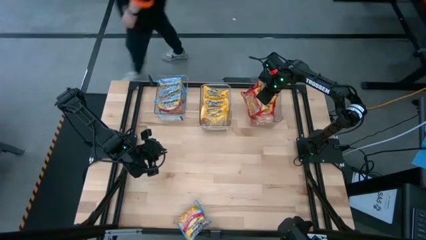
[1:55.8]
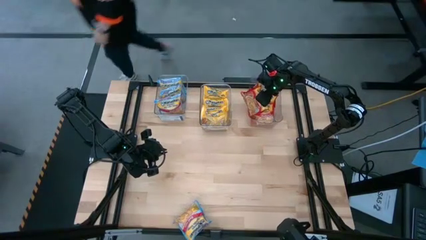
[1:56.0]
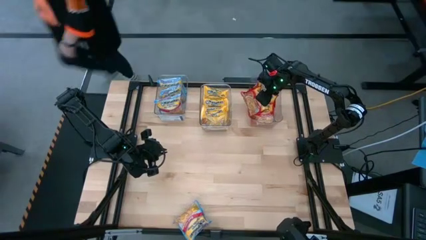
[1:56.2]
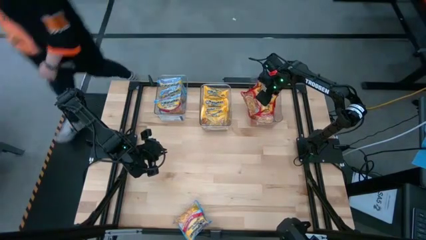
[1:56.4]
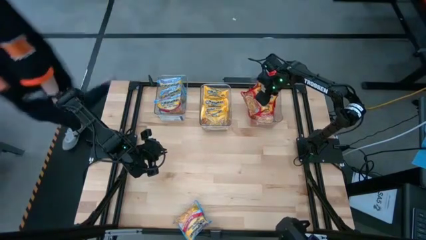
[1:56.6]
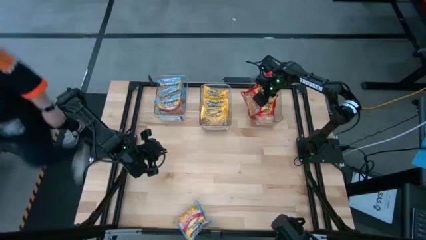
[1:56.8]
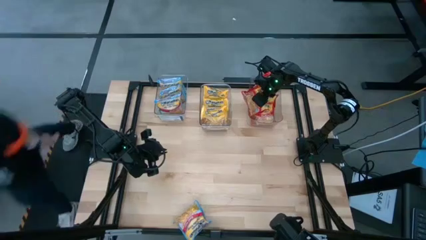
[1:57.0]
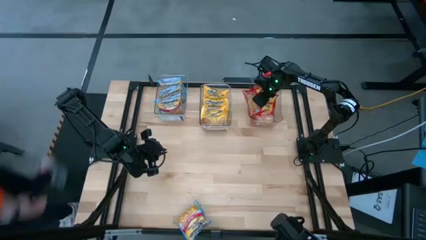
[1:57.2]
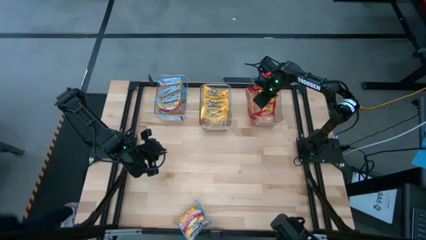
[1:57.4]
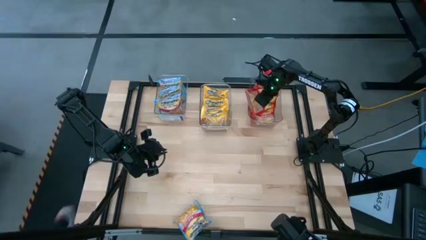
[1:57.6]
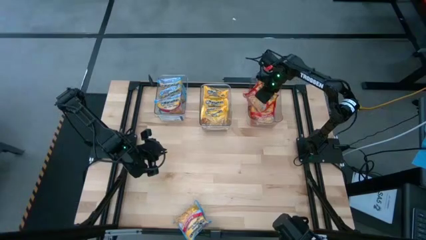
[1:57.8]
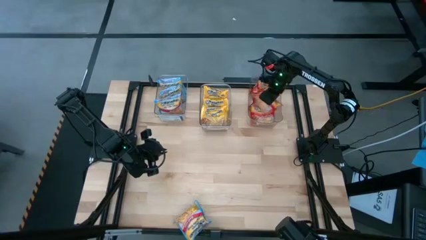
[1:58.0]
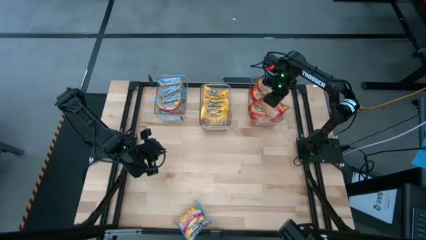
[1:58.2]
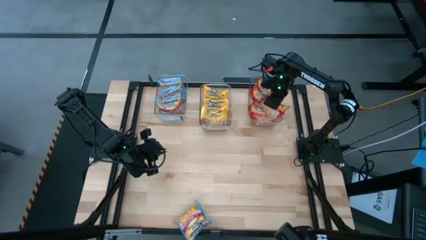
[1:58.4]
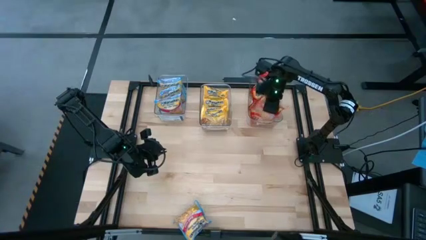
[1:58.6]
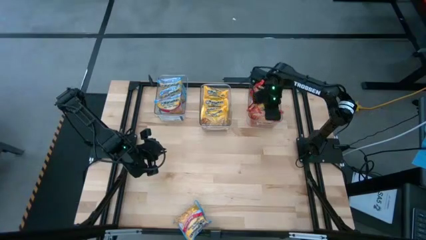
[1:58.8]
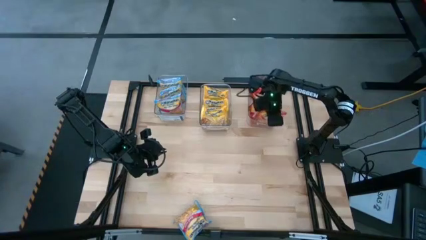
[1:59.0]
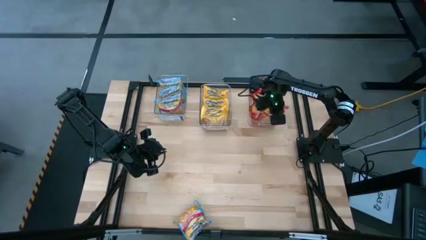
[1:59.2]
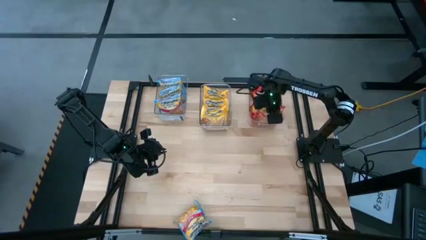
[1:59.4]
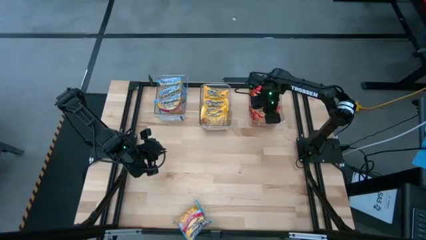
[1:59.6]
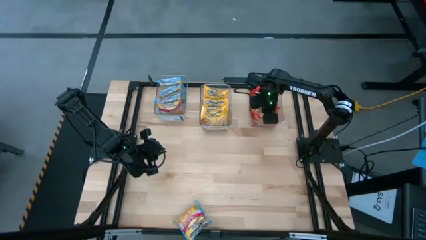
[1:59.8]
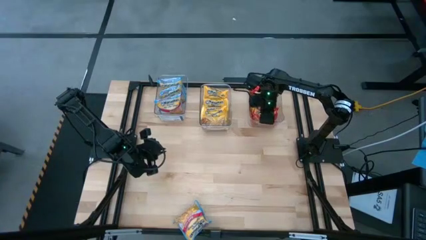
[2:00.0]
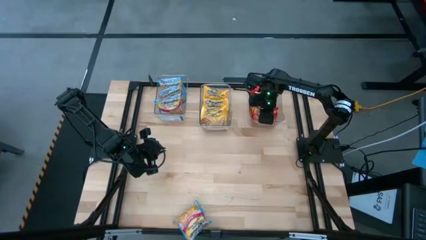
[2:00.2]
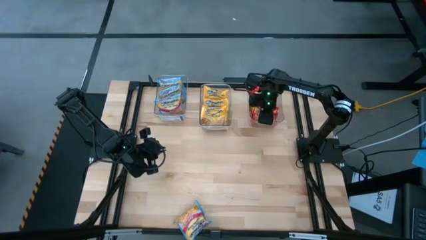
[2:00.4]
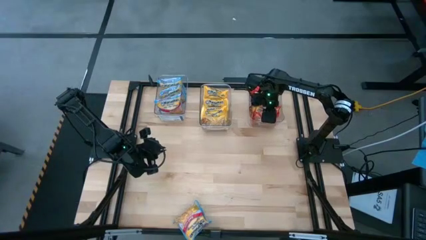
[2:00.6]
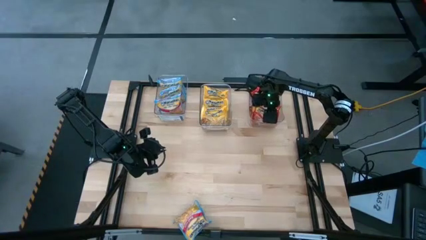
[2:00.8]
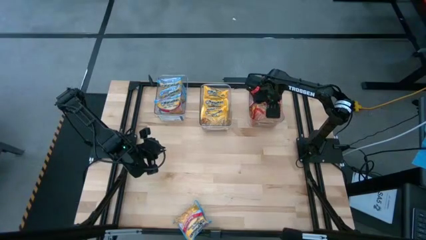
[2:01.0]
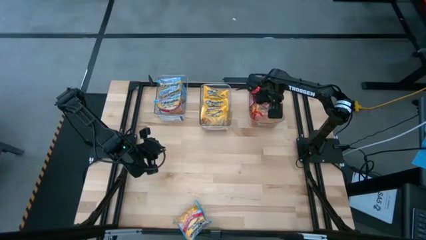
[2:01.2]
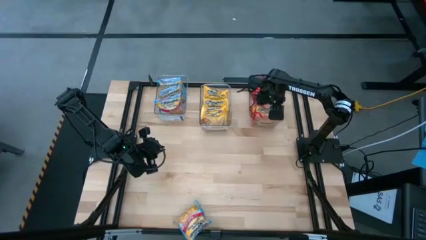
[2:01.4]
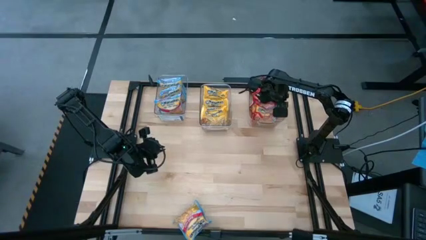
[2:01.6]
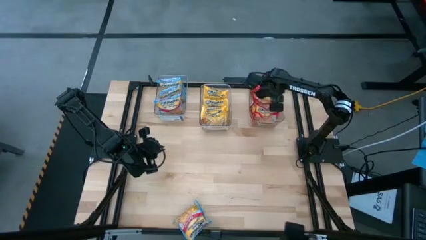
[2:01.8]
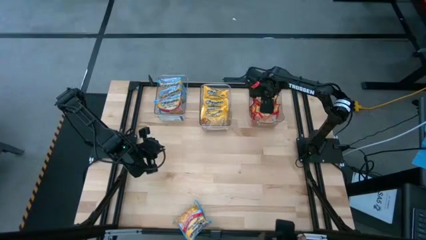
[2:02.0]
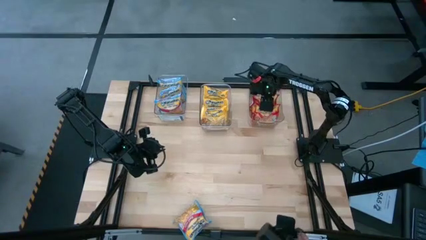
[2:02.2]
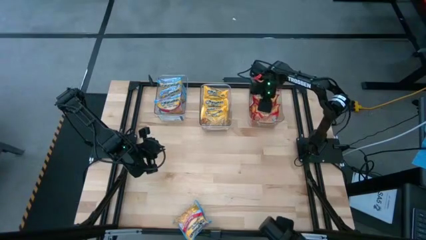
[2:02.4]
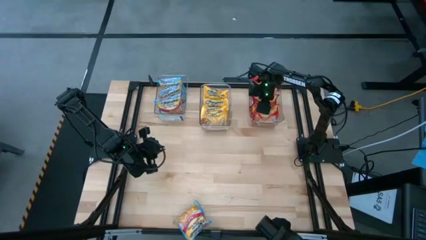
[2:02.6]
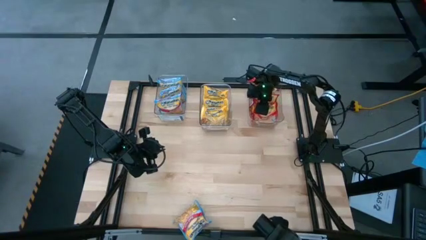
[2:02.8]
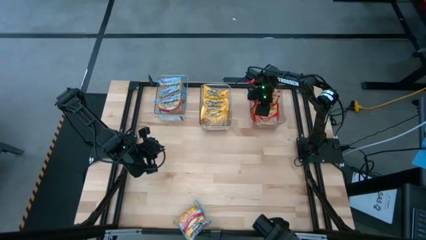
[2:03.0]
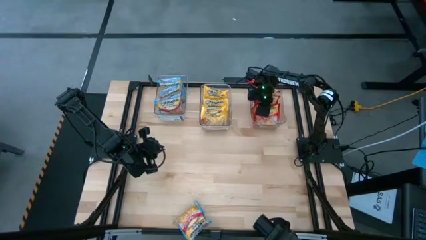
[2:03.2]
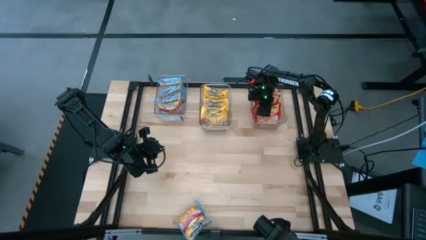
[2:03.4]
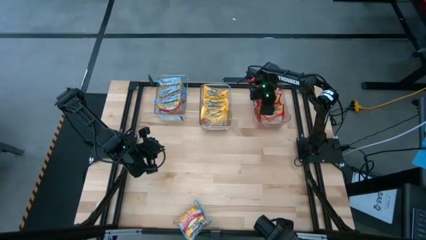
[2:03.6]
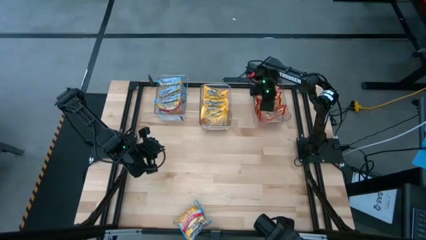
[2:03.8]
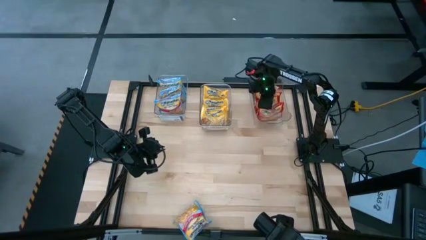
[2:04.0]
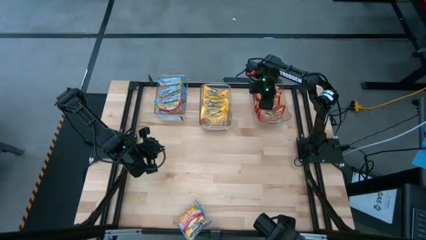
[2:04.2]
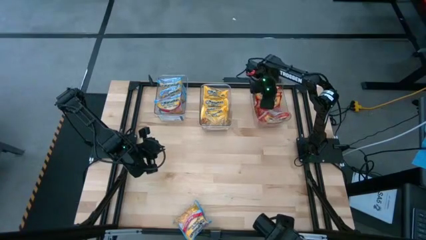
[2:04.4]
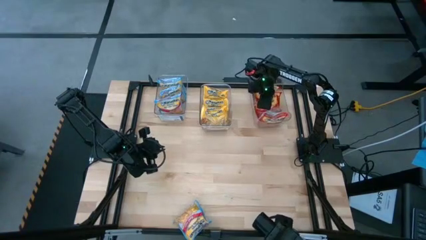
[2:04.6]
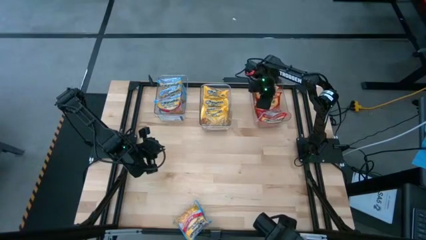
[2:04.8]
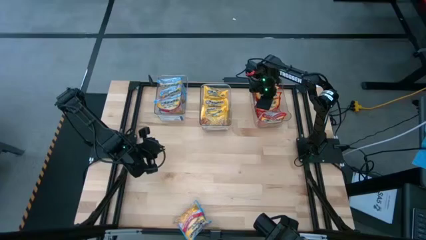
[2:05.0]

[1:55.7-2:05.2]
Task: Sort Maruchan noodles
Adjust the red noodle packs on the right transparent bin

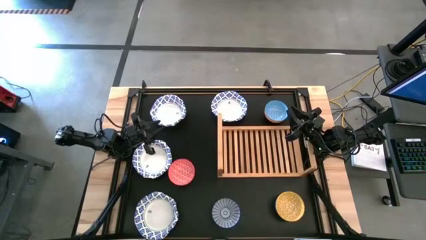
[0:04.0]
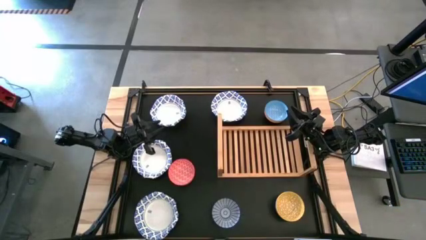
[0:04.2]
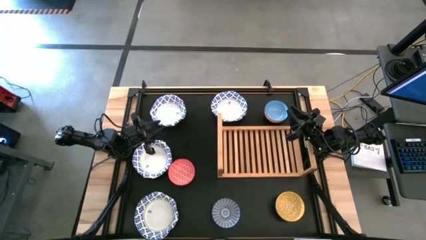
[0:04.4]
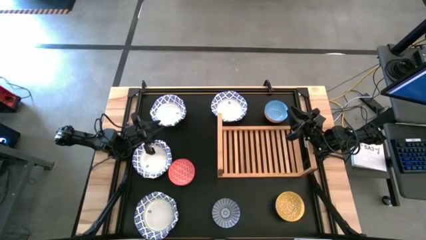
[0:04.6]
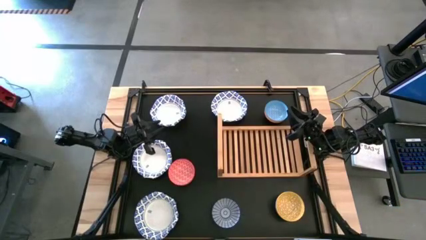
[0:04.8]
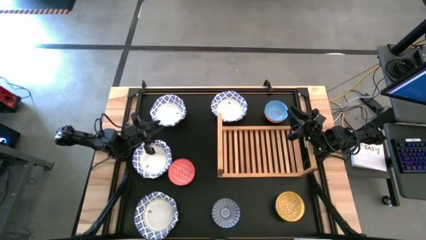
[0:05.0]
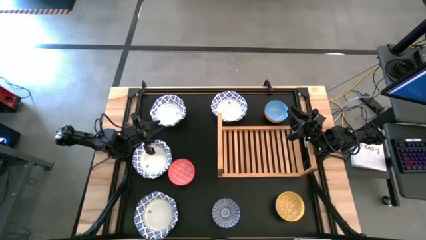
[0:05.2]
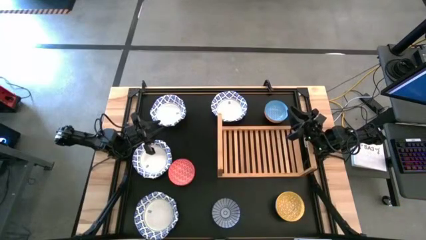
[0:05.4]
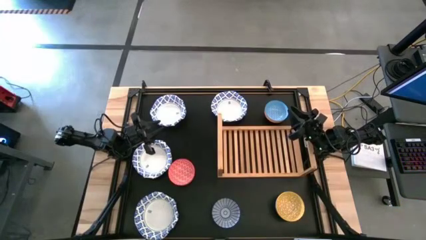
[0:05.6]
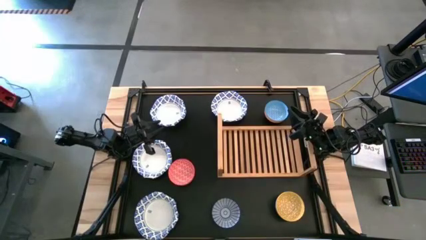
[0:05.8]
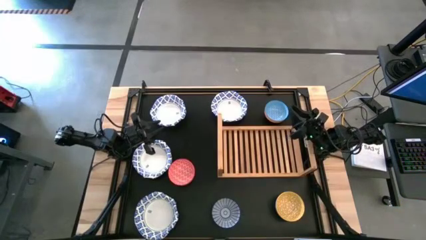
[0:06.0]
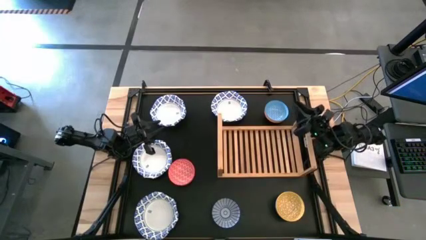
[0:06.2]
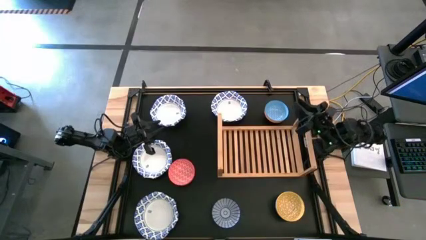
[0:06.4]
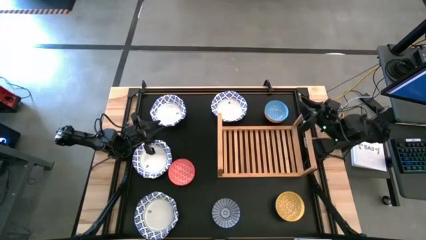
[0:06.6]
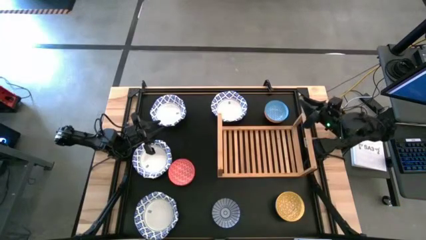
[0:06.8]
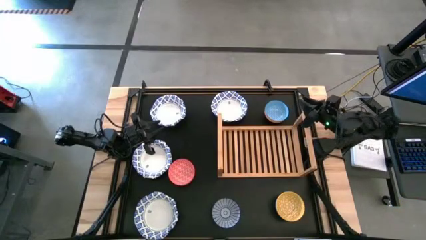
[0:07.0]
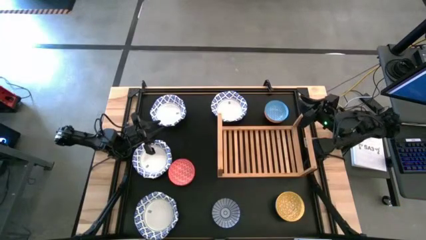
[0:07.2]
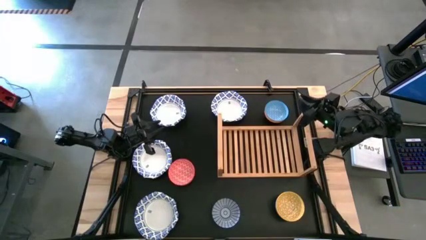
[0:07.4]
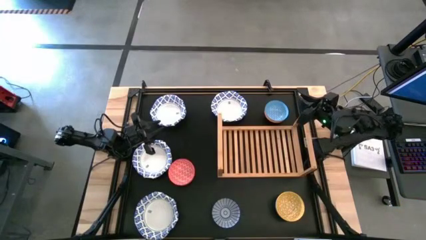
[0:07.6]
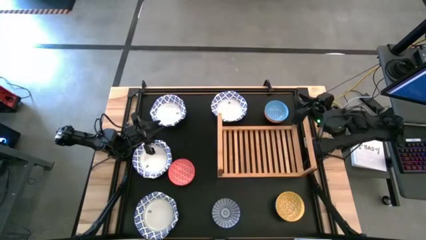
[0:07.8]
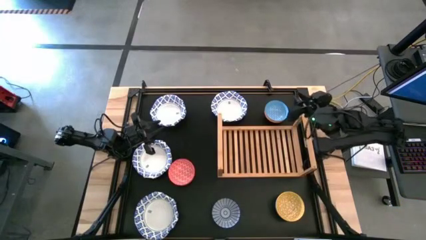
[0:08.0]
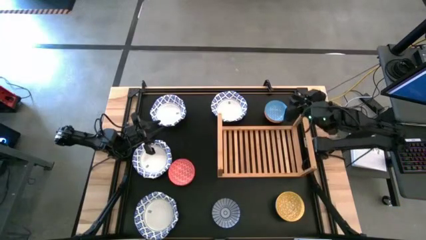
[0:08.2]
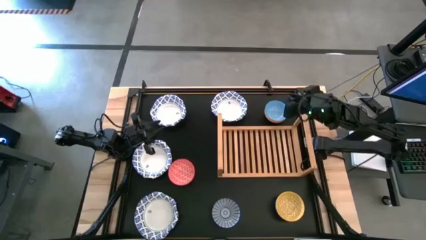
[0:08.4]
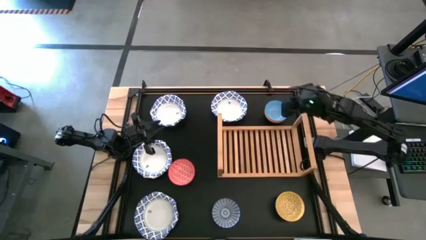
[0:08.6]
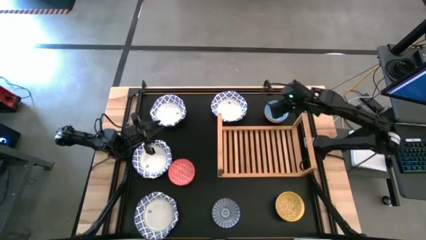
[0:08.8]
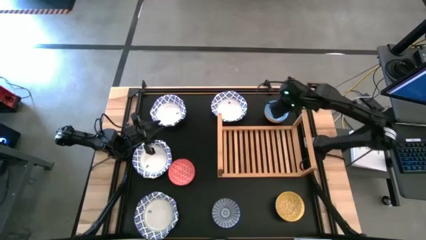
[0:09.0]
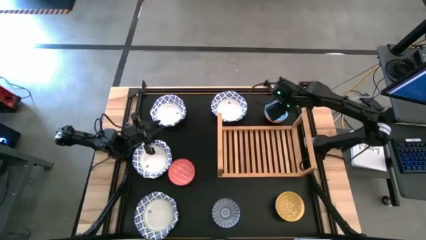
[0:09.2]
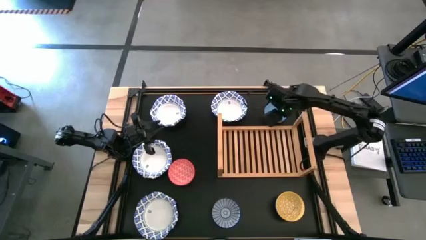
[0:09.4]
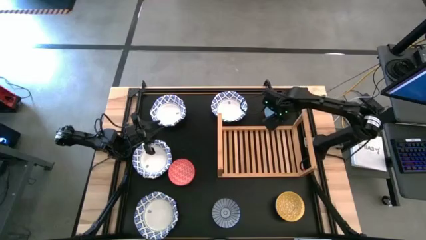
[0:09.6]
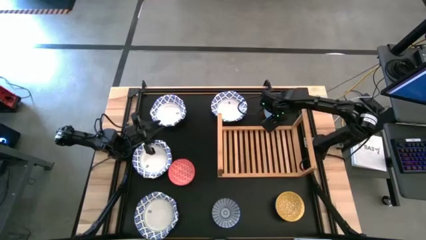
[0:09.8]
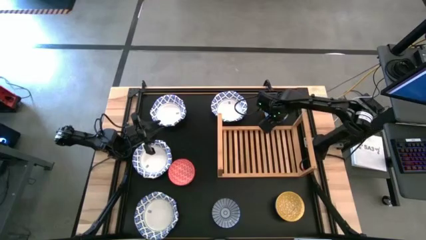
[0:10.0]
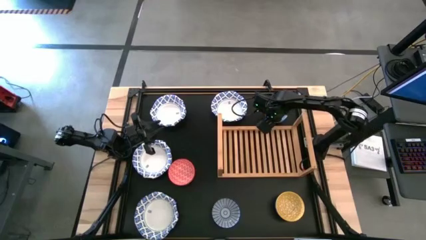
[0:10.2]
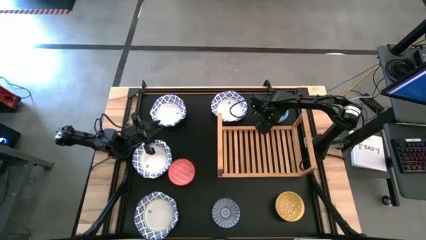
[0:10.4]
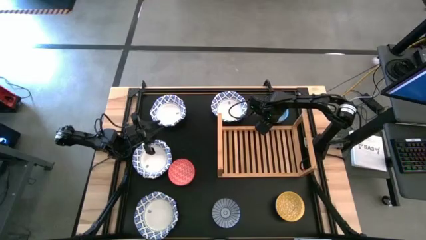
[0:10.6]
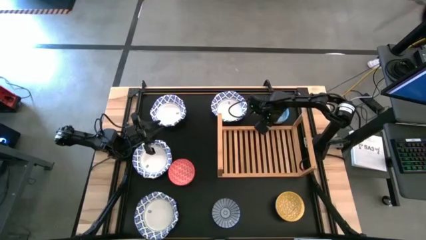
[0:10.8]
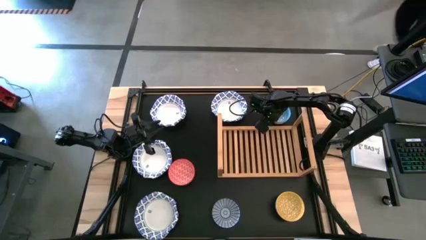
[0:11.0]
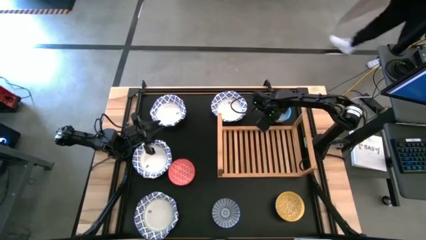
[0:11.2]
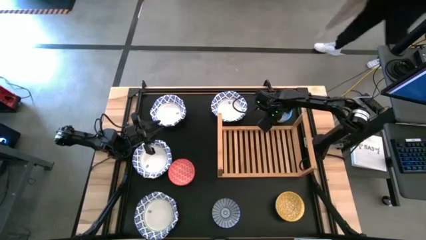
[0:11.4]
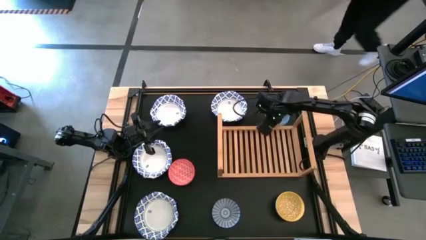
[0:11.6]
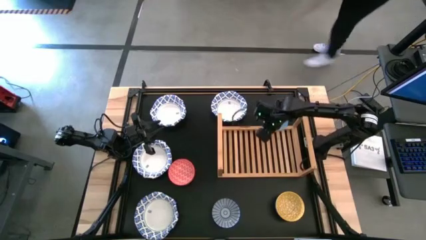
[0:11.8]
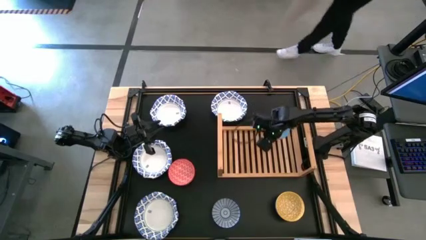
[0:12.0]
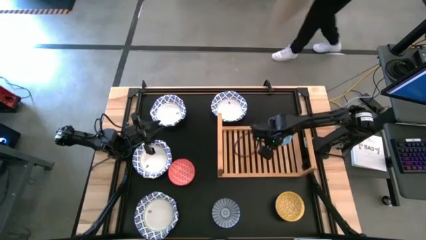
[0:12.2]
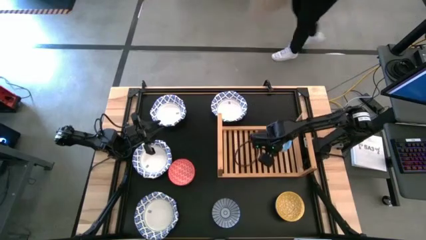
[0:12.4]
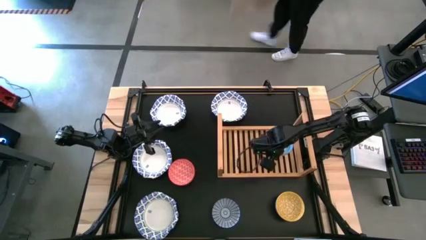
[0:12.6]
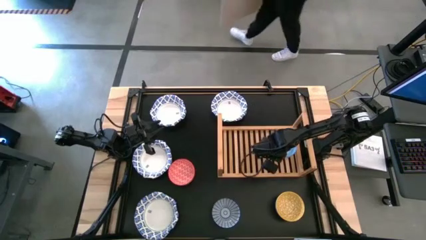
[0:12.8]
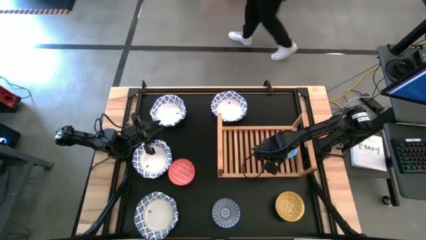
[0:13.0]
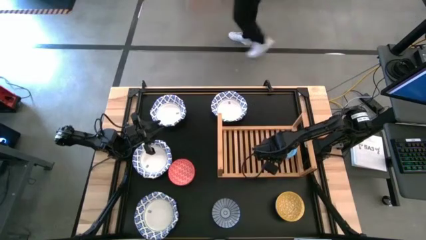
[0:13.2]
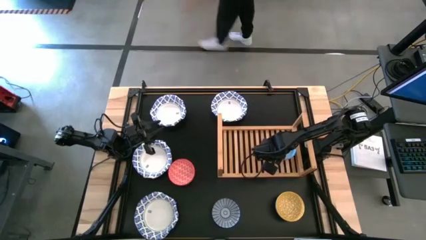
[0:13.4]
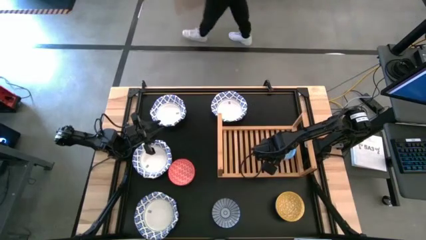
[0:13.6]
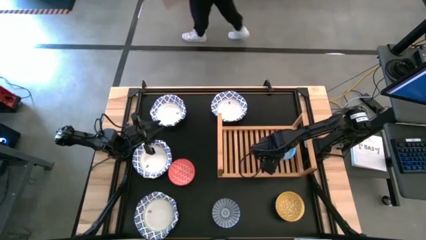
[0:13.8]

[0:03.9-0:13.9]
Task: Place and stack bowls onto a shelf
Put the light blue patterned bowl on the shelf
